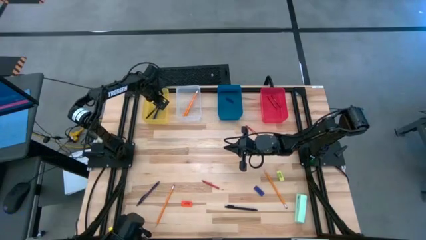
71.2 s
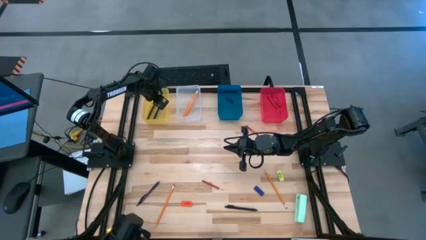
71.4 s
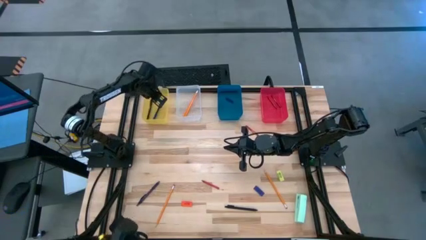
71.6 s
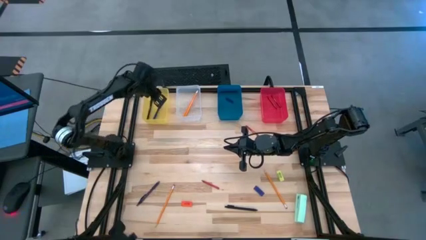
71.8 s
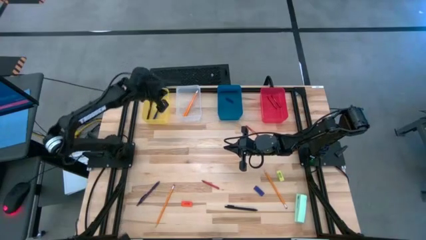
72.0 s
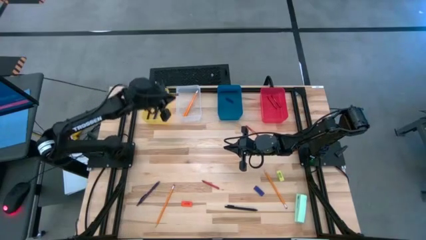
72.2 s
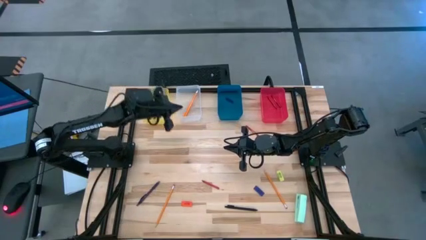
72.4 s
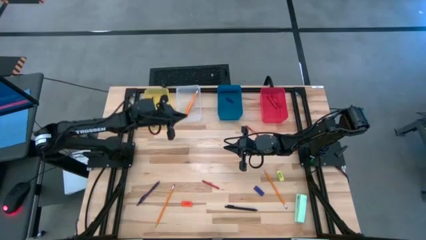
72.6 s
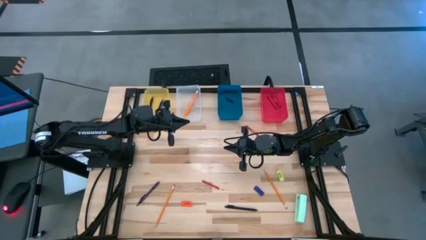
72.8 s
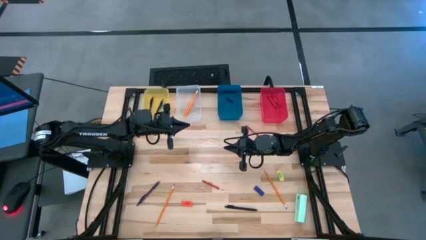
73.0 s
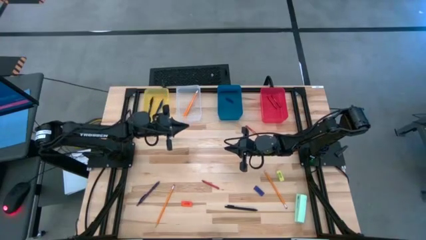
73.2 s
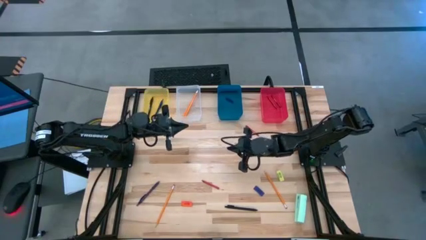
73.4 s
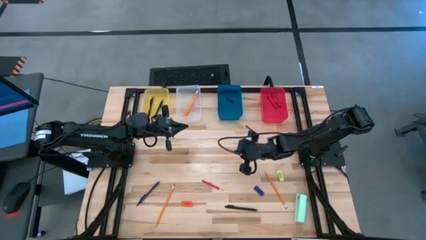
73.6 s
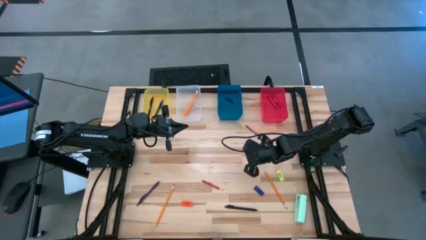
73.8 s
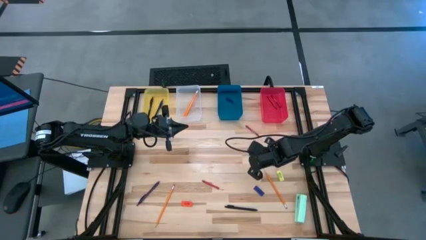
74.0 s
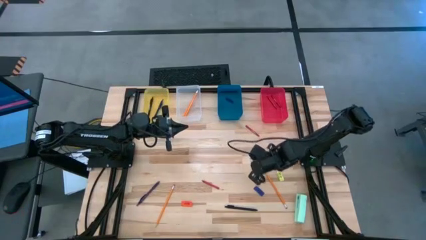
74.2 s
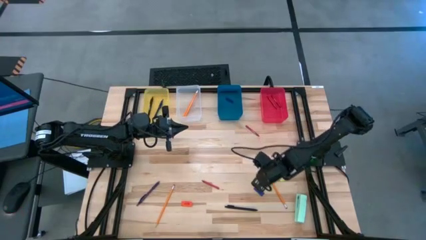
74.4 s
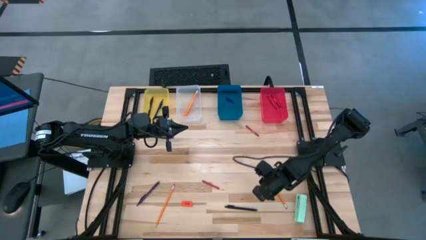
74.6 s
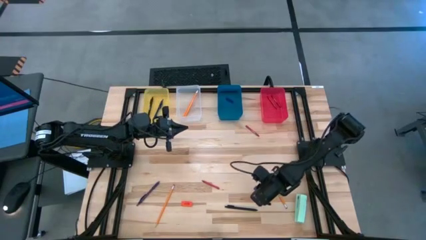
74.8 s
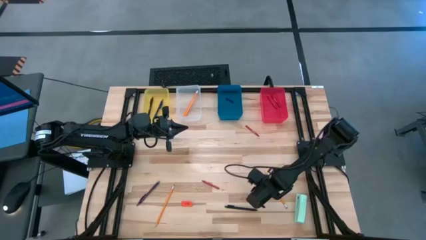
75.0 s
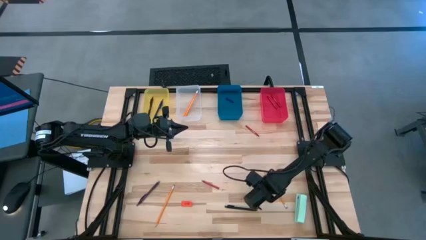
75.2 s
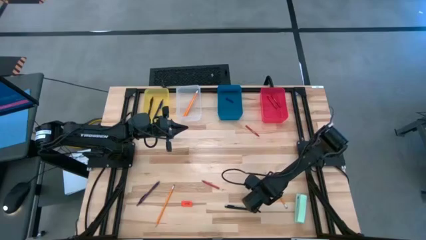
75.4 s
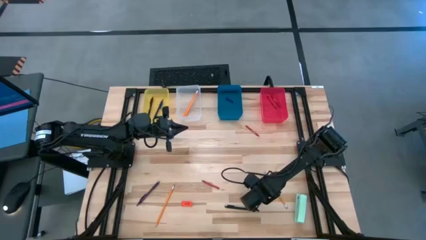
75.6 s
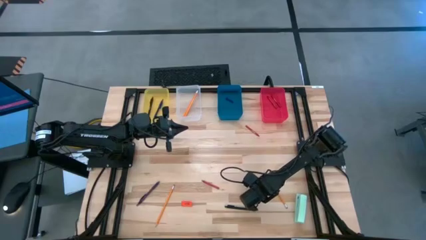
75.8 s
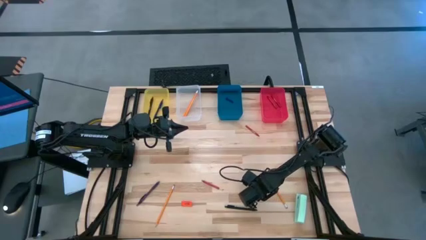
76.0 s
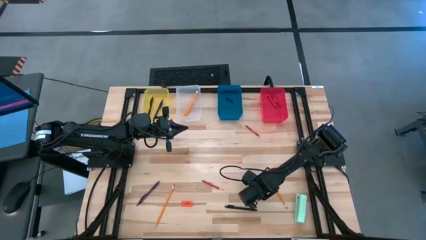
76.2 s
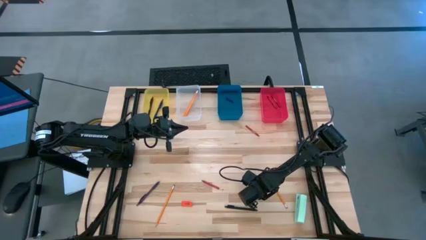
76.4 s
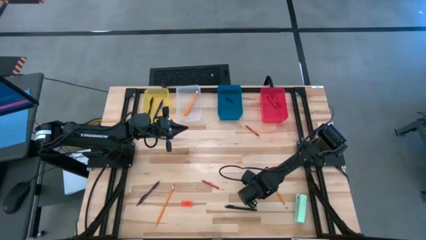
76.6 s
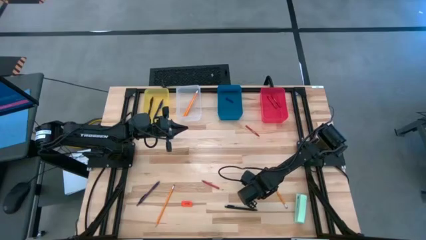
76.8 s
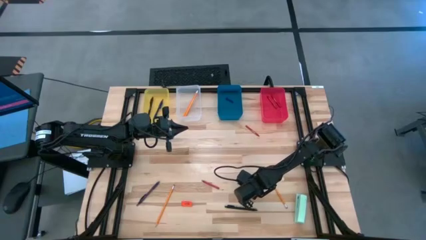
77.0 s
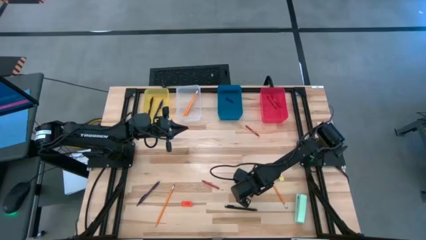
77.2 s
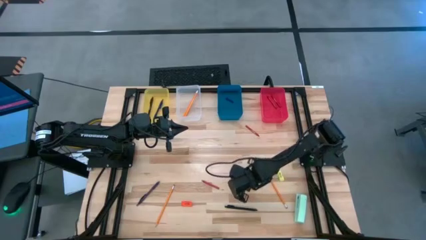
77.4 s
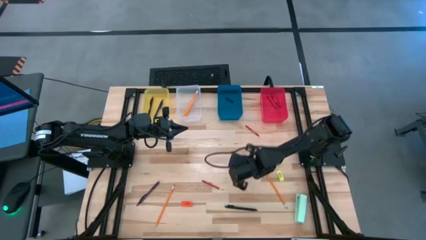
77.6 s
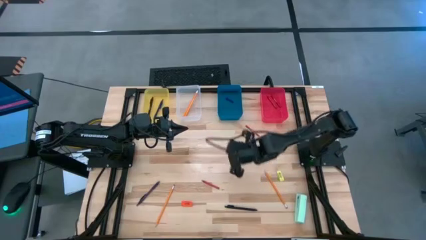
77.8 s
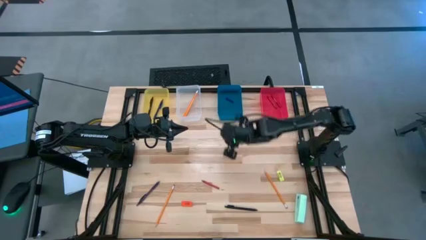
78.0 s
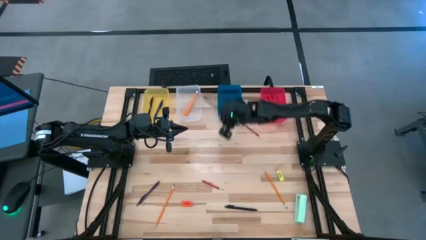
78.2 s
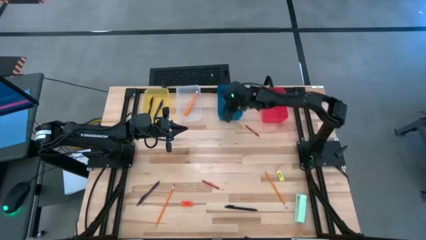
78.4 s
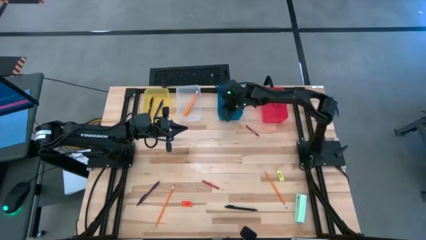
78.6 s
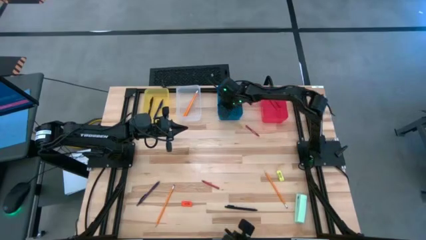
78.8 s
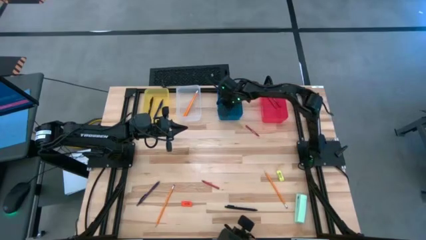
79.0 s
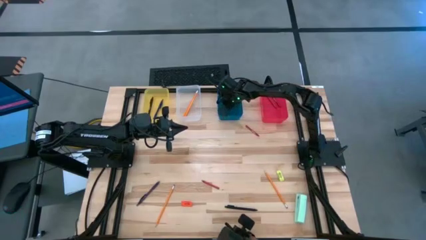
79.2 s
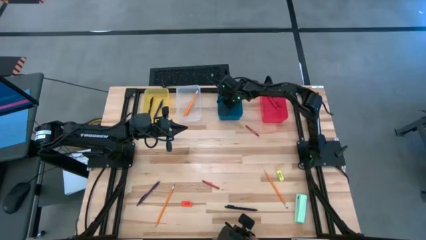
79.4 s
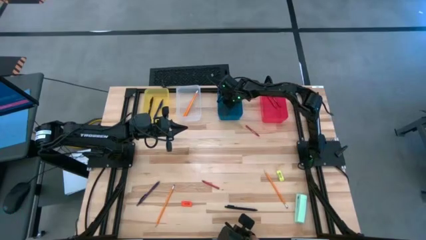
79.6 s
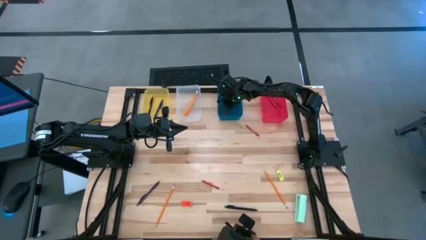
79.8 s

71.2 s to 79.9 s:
Task: Sort crayons/erasers/pens/pencils in bins
Put the blue eraser into the blue bin

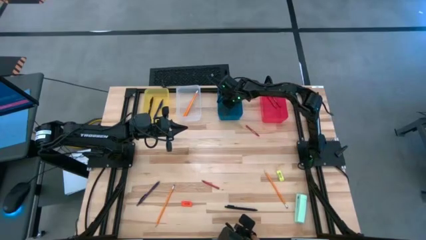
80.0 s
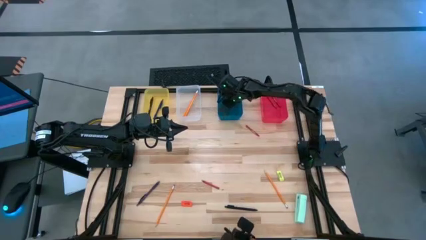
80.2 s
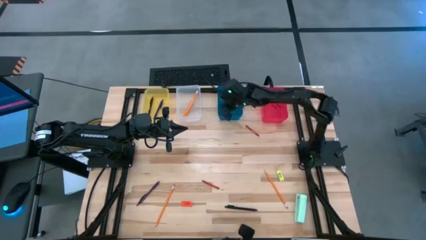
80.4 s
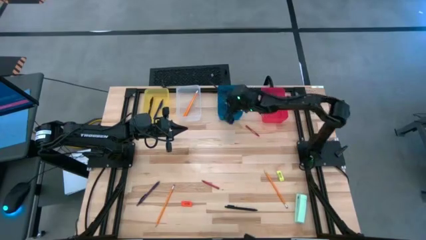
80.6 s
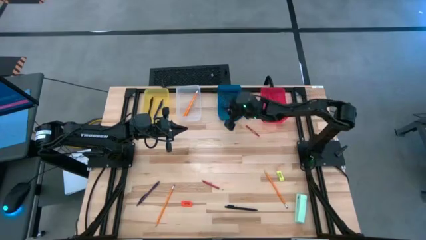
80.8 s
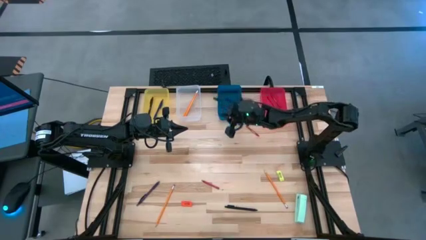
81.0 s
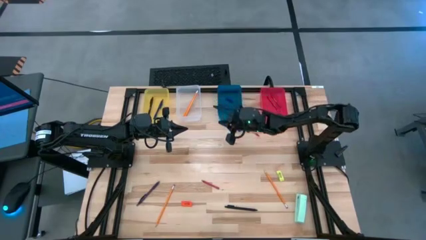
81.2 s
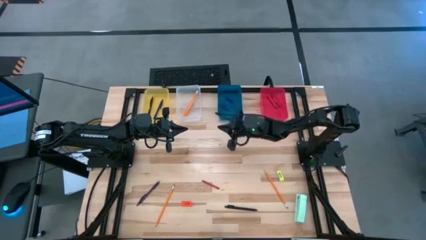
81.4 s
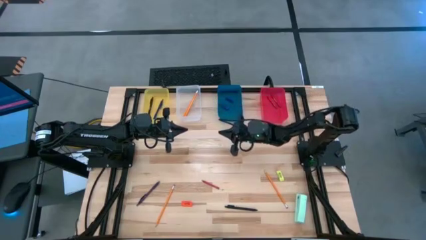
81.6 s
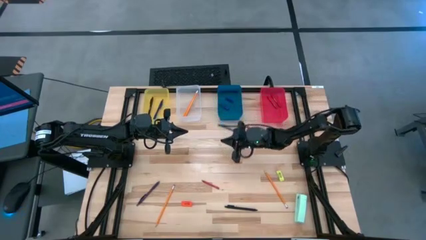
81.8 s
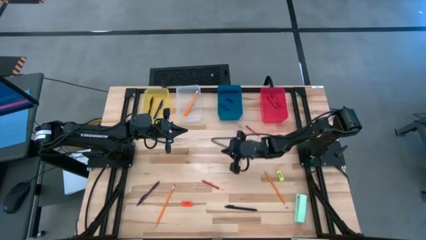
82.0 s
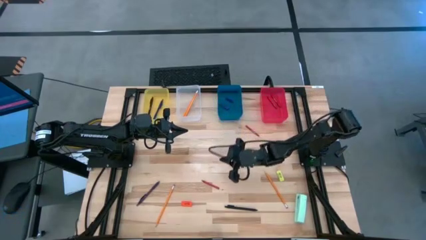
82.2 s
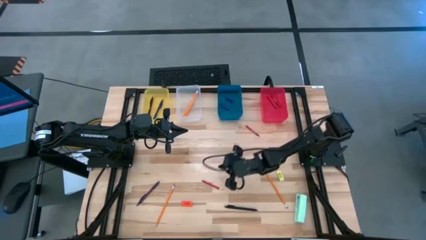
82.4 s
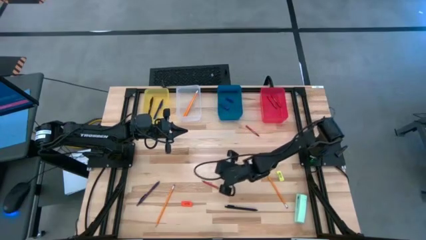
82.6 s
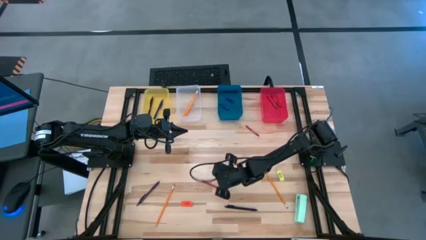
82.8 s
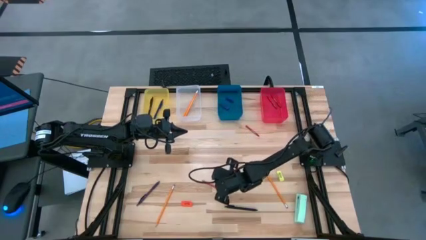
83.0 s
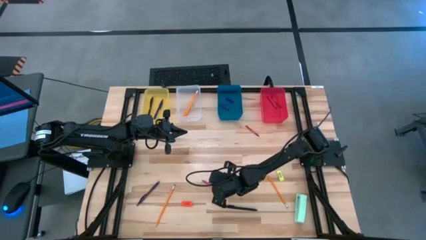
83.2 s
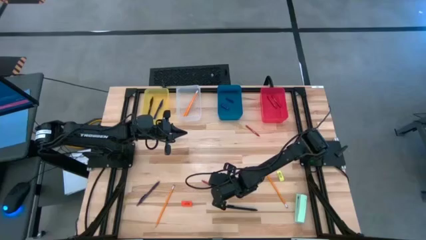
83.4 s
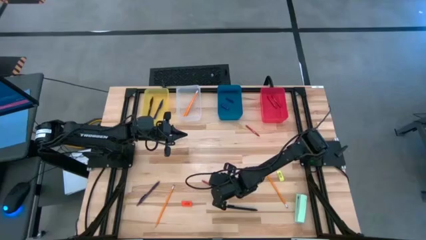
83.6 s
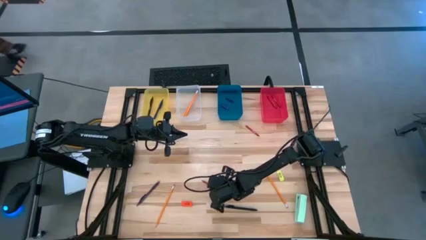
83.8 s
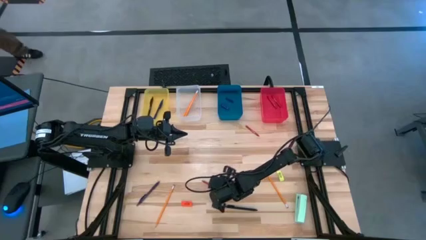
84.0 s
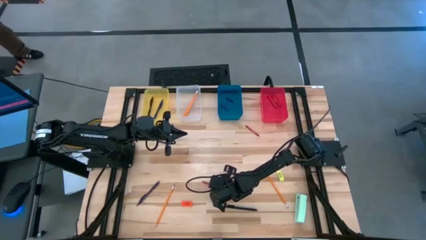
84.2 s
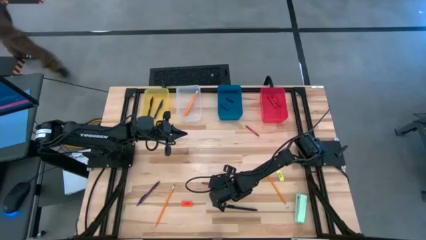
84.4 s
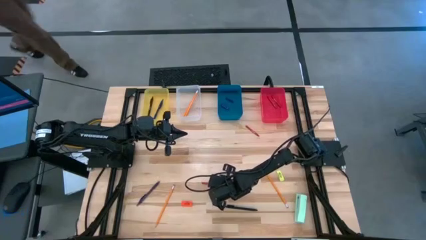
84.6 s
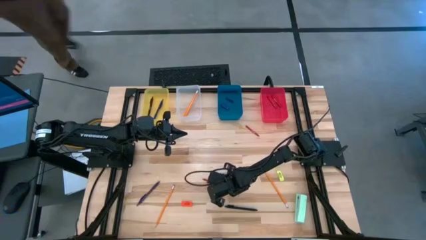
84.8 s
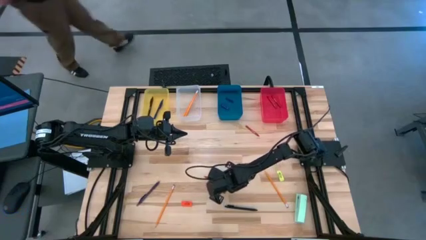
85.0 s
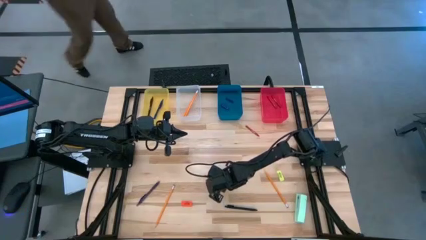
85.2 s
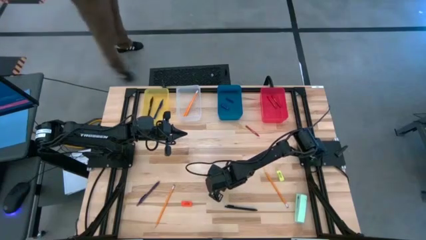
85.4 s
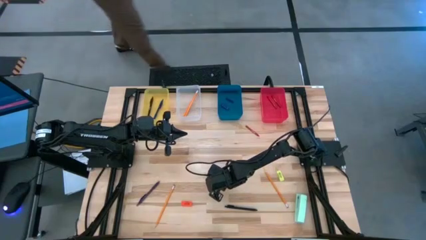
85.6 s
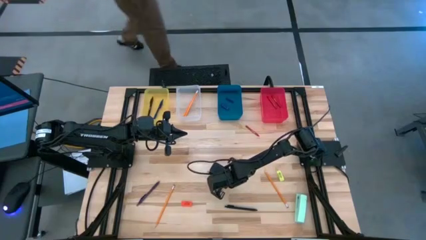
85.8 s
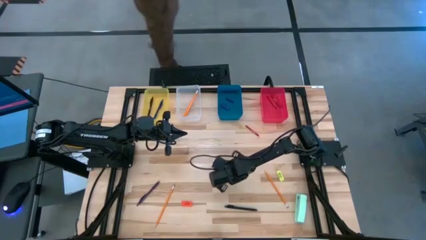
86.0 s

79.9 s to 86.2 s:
Put the red crayon into the red bin
